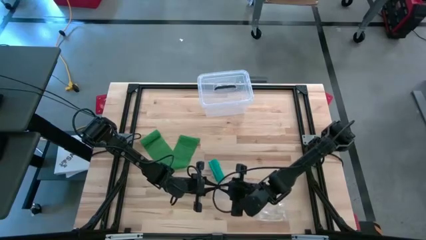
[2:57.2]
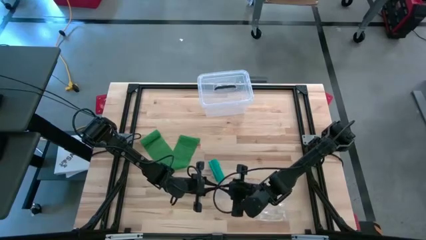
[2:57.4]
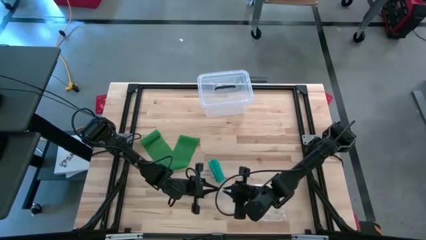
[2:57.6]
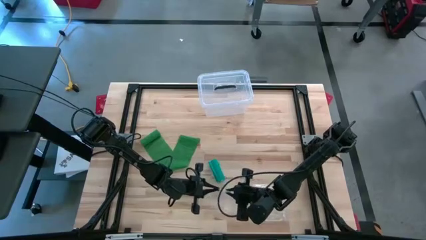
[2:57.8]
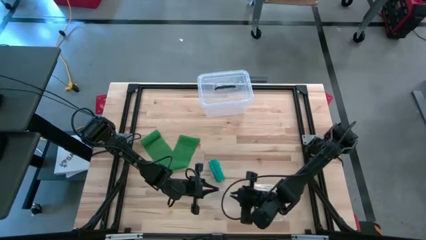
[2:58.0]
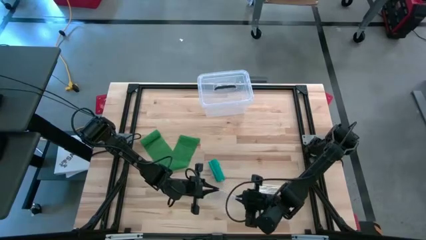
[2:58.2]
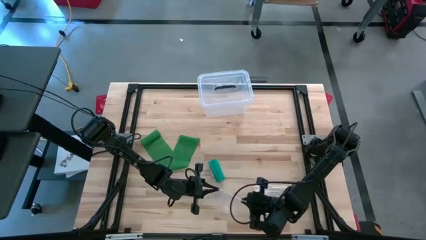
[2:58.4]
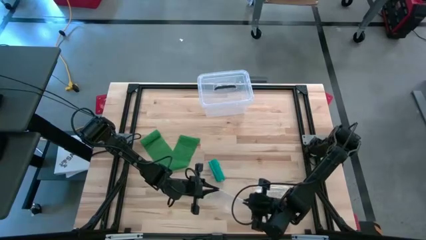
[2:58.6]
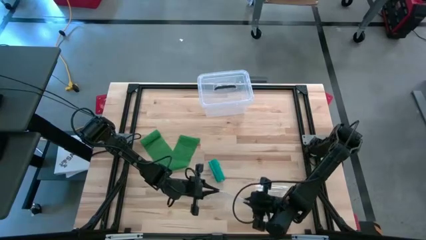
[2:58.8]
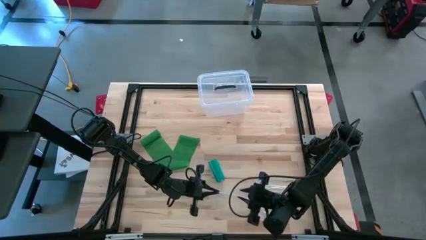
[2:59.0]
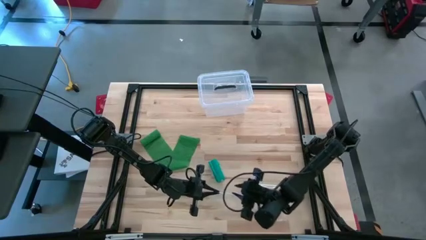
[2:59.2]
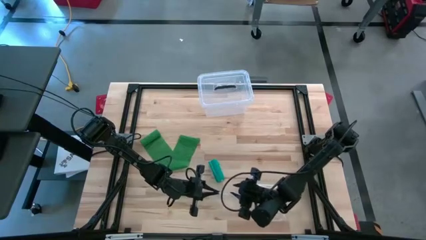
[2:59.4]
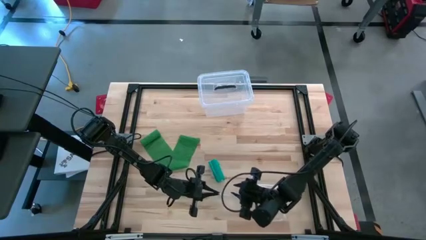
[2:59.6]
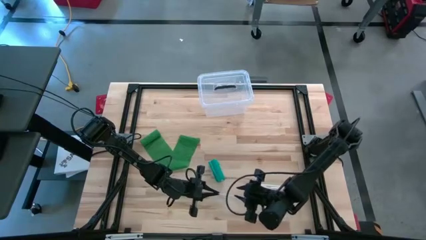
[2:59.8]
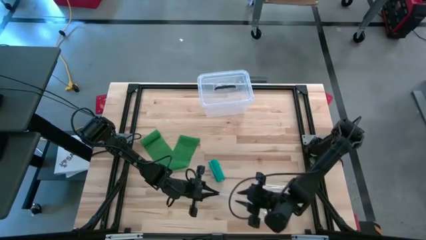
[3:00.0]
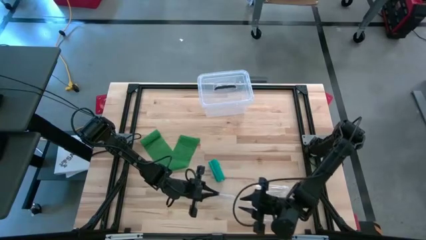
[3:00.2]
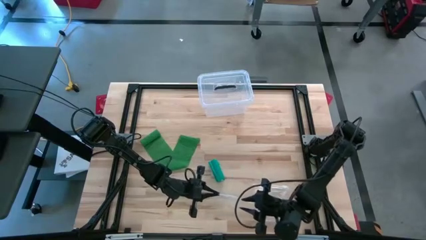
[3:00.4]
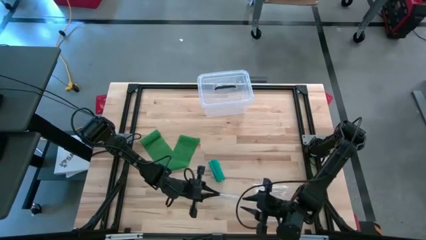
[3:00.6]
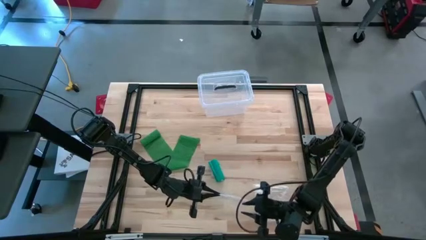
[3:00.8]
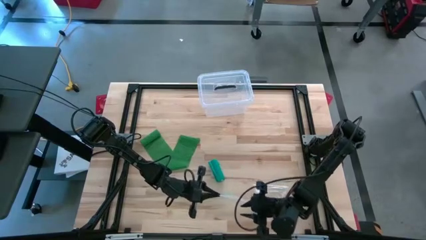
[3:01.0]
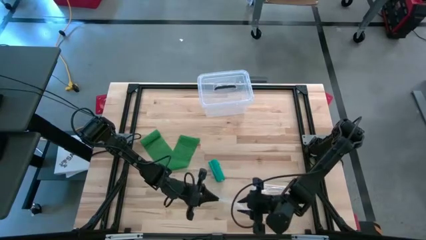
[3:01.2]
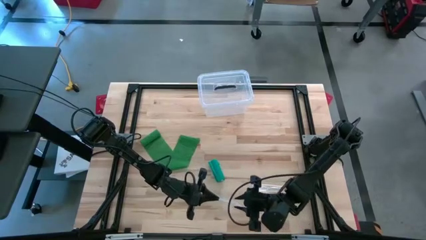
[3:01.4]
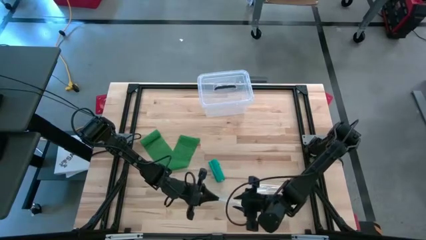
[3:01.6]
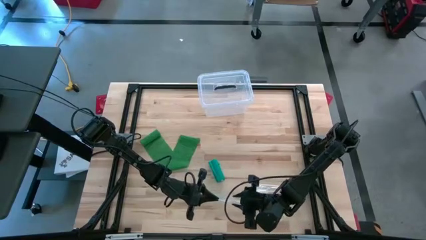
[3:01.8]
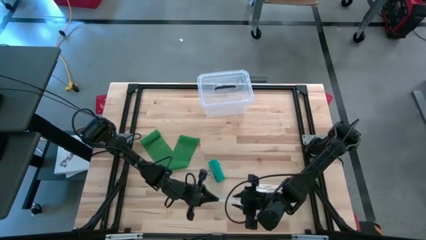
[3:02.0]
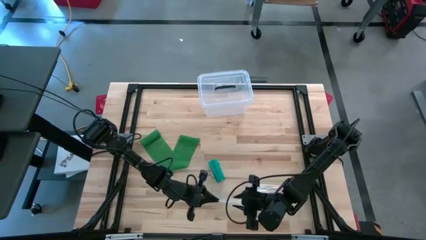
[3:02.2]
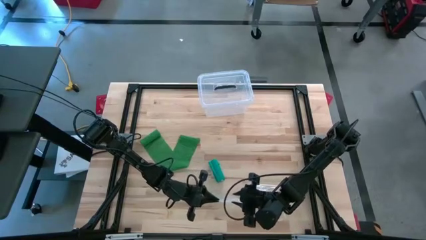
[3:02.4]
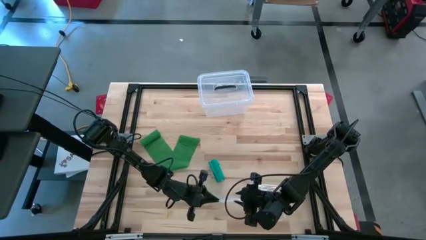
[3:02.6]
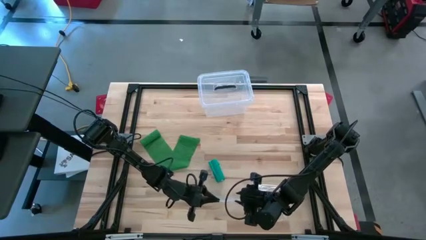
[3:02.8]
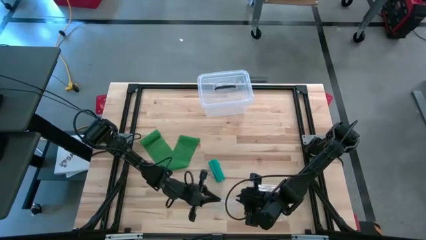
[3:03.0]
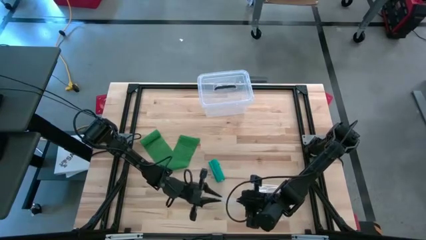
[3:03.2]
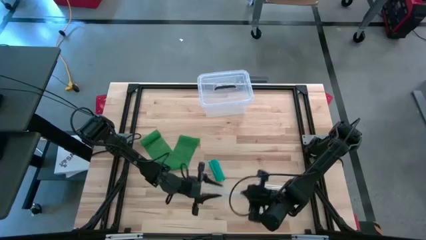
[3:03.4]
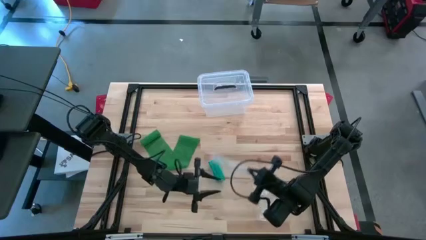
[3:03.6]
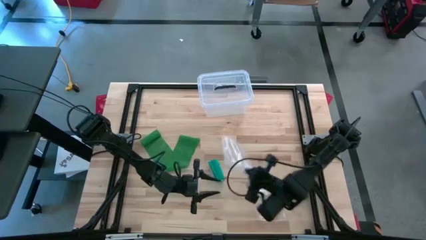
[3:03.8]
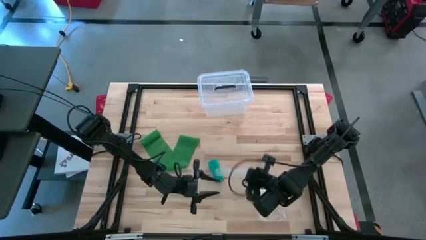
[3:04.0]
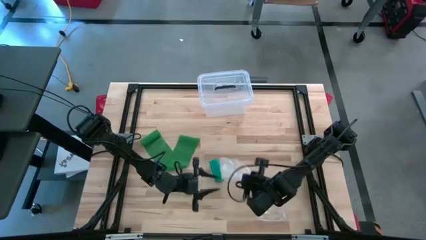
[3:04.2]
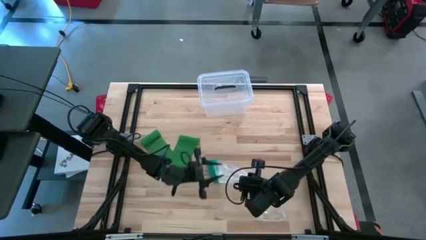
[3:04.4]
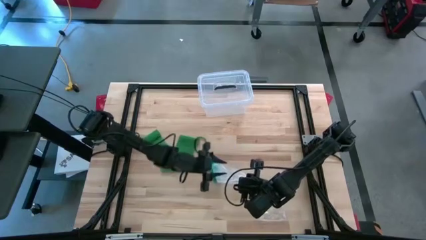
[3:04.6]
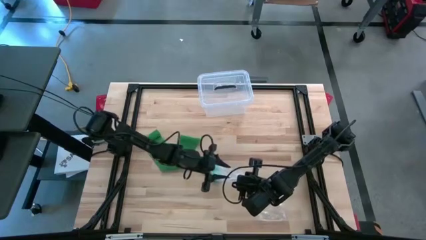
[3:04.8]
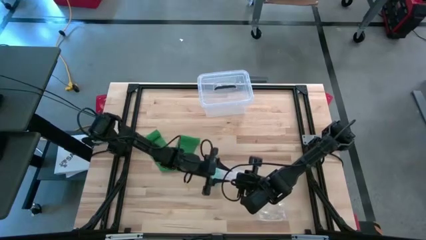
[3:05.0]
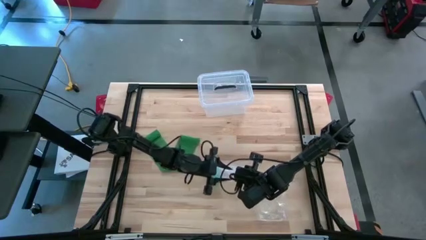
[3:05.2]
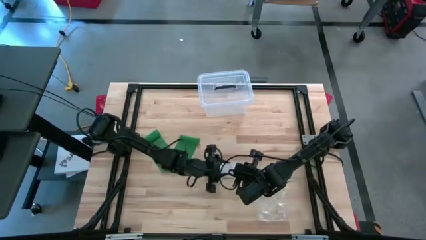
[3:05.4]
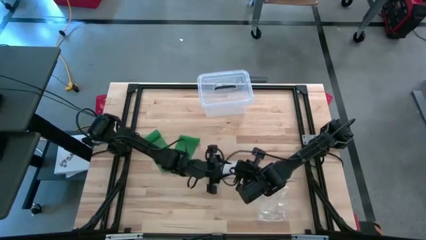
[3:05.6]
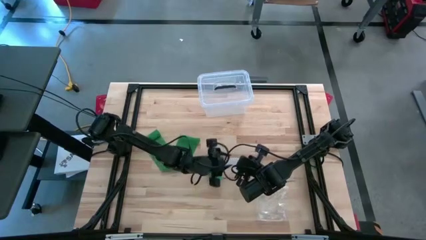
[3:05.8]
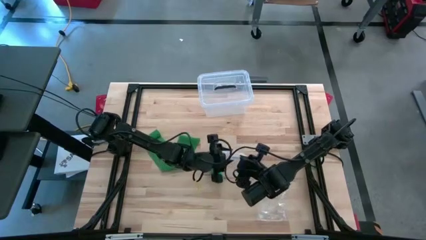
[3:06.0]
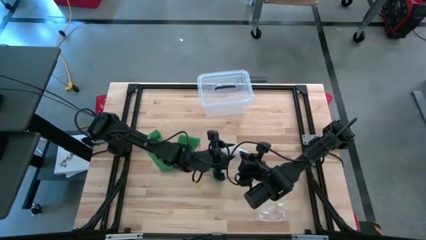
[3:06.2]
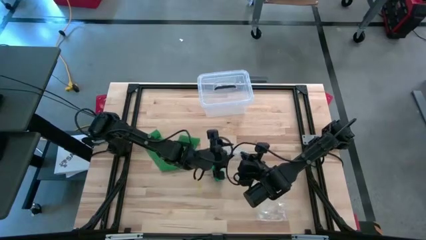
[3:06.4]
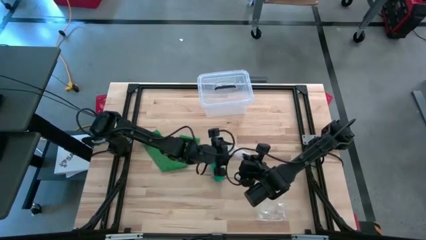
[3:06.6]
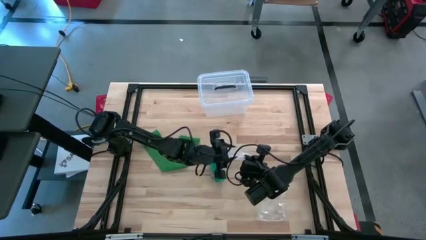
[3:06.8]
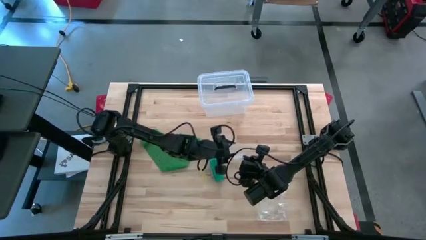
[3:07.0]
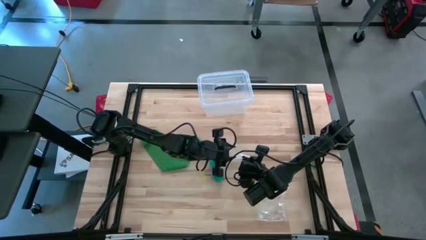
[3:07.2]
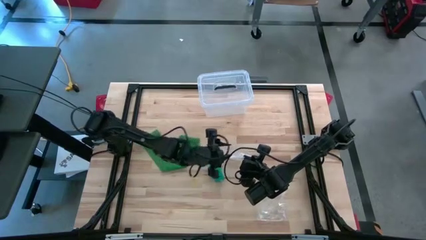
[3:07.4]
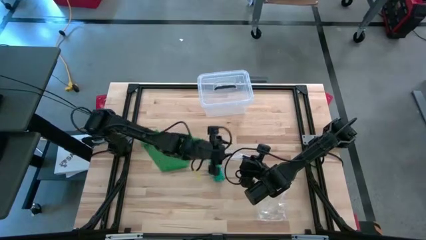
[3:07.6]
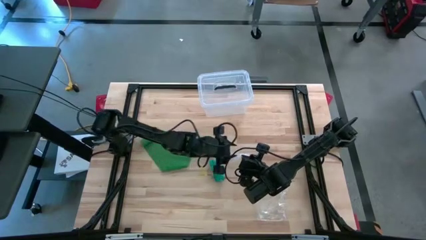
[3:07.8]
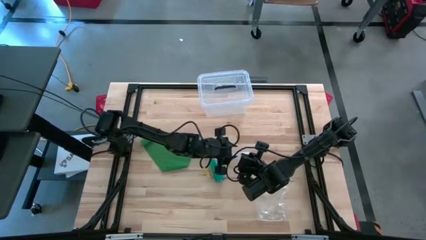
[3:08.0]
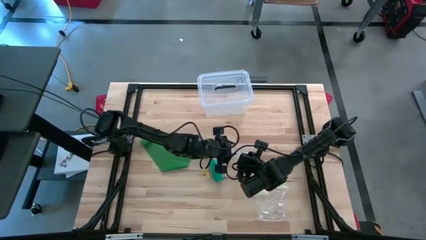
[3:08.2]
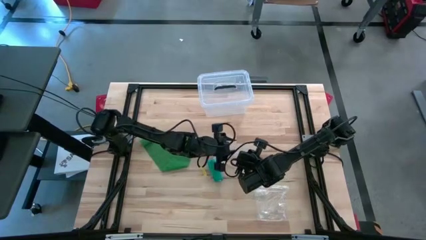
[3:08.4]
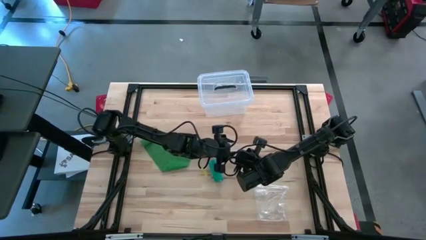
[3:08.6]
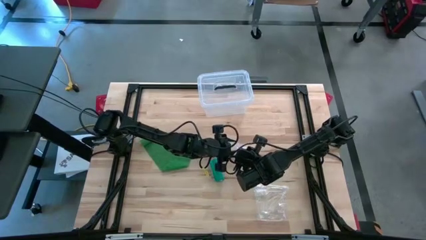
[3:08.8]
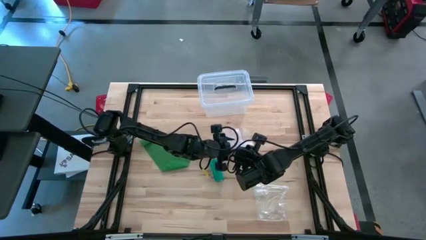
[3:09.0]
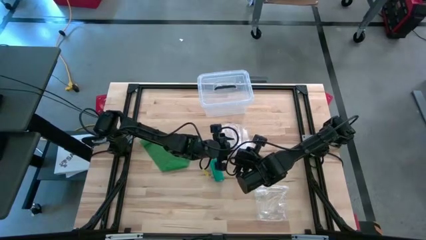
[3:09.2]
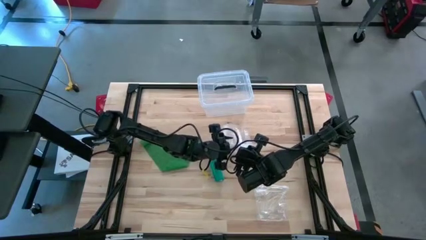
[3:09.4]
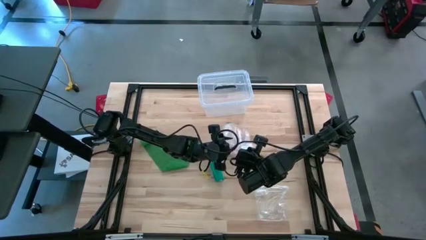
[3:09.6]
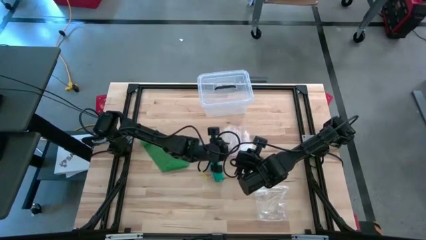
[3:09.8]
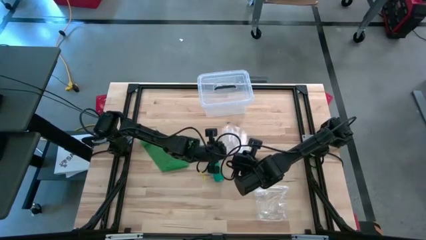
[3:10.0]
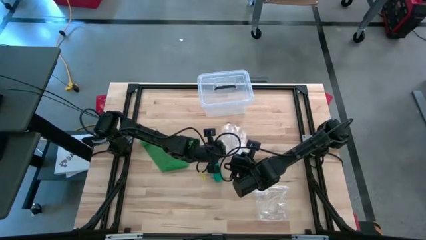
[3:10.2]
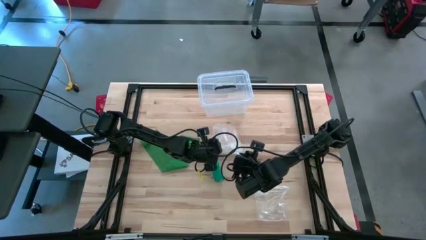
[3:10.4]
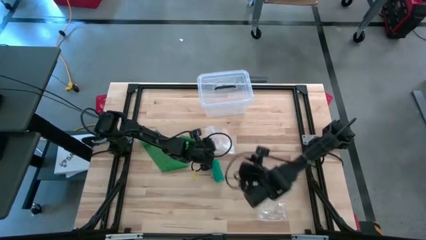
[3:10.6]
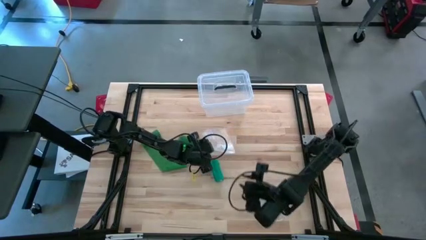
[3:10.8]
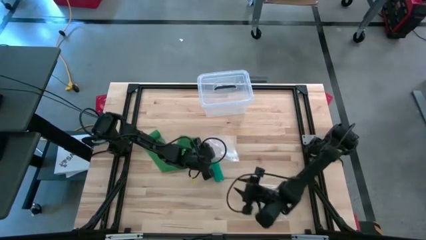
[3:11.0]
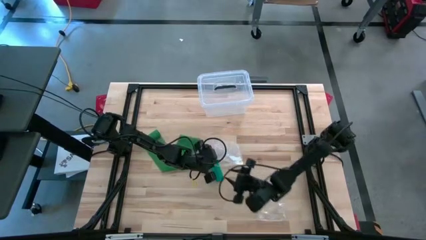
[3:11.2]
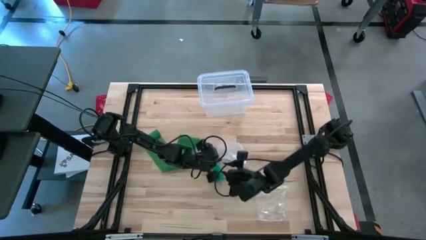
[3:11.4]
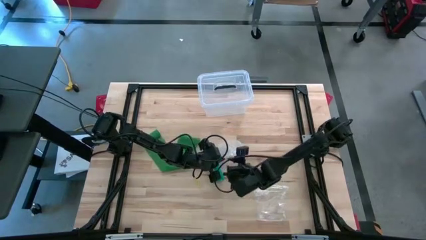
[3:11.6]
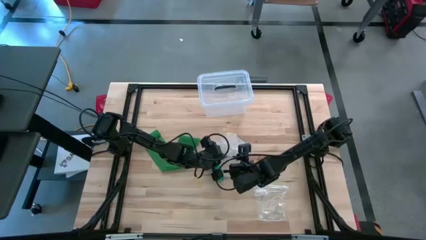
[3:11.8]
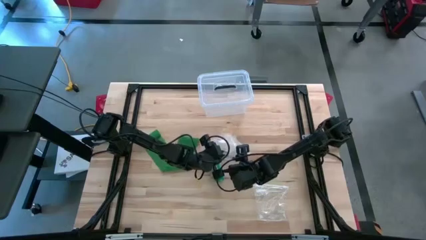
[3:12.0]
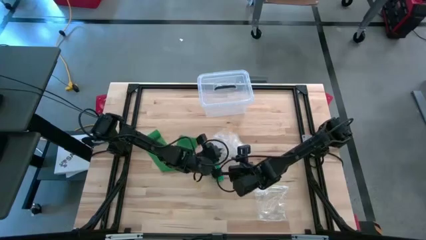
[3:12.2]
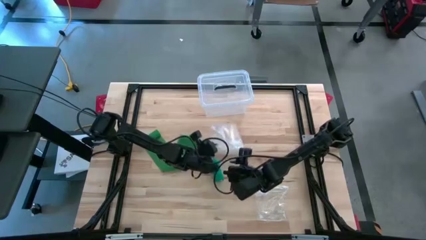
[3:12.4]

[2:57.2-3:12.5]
Task: Roll bandage
Open the transparent zip bag

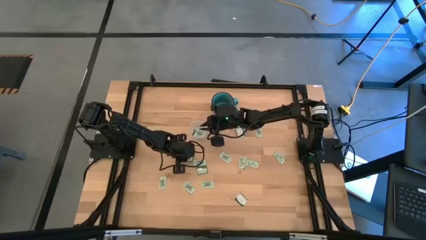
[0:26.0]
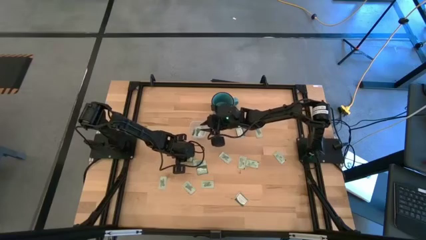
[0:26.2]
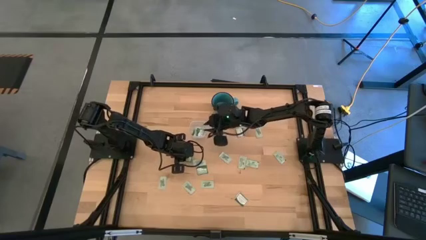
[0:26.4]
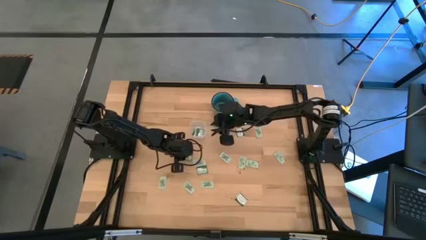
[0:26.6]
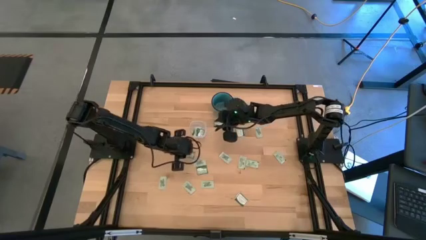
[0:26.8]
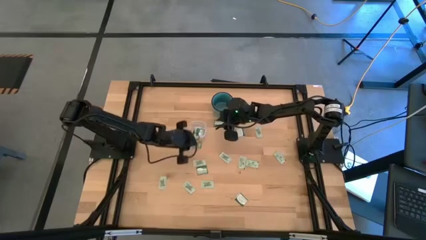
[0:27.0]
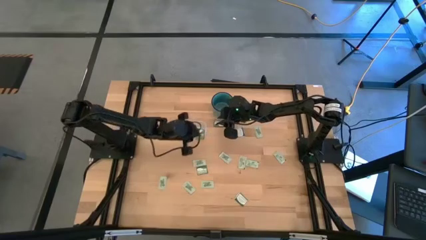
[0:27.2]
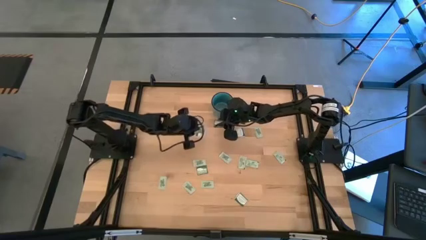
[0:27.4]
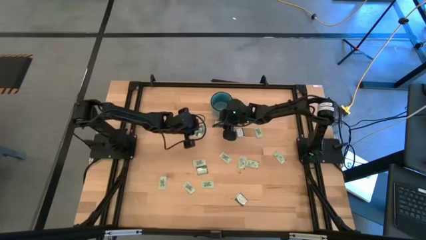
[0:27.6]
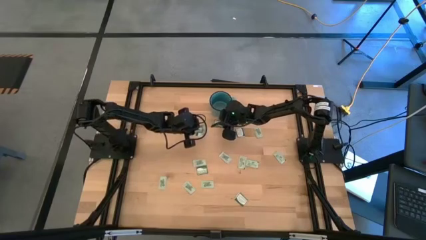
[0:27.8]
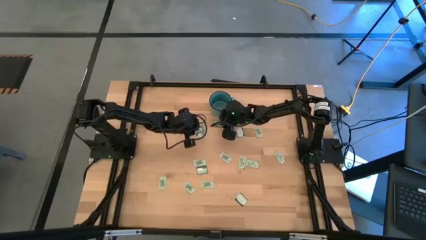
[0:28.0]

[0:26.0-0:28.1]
Task: Pick and place Stevia / Truvia into bins
Put the dark green truvia packet into the transparent container
